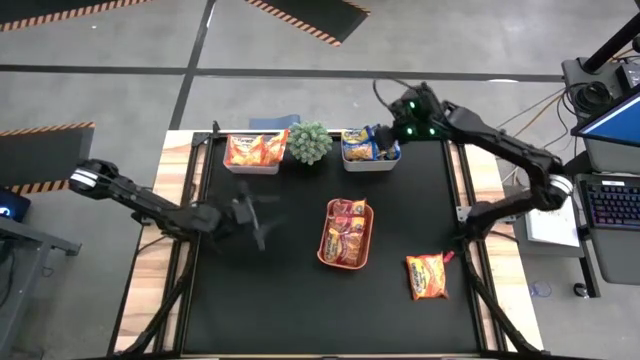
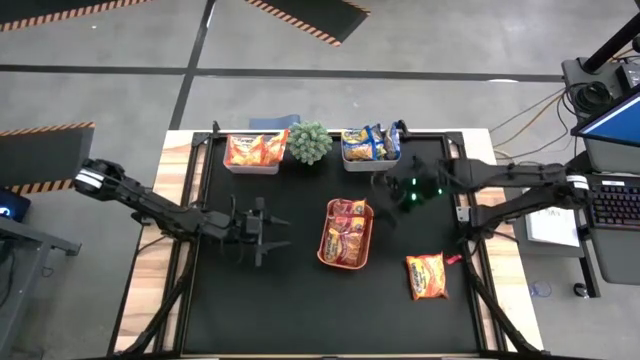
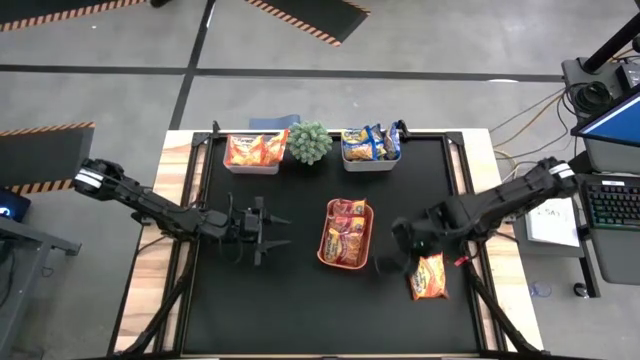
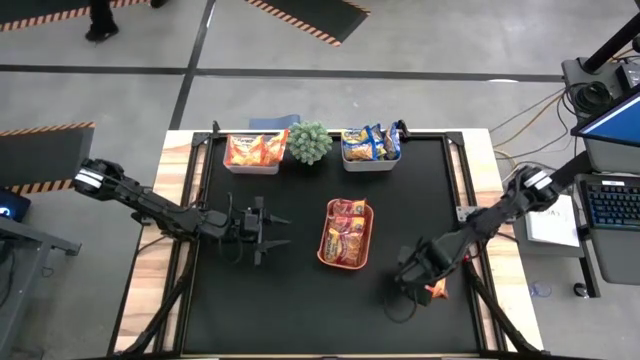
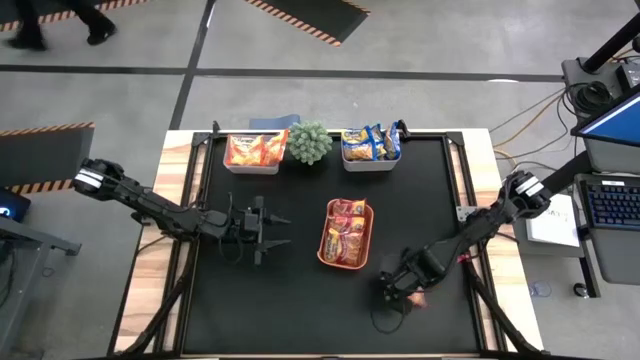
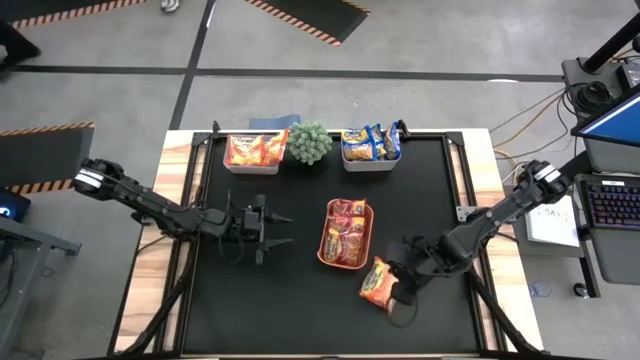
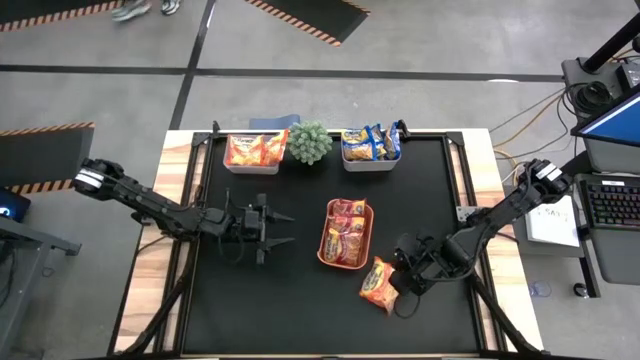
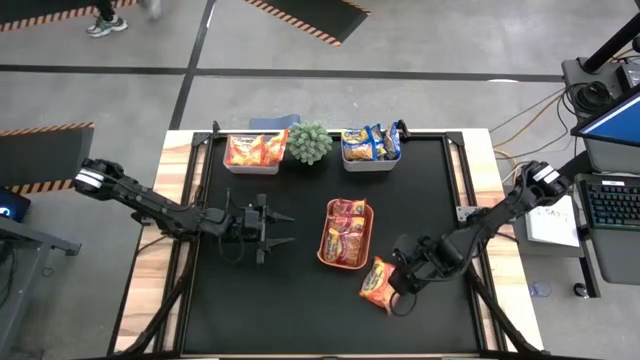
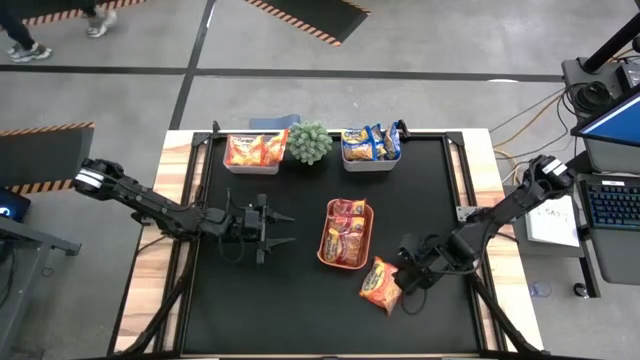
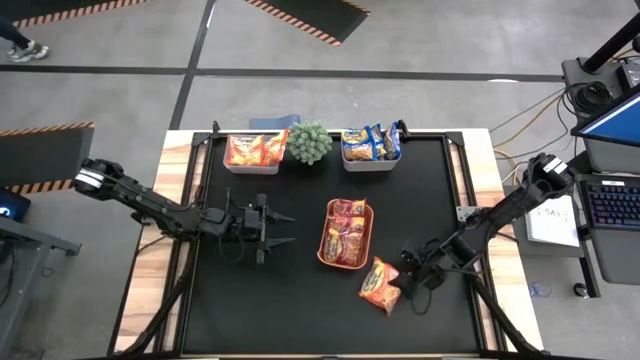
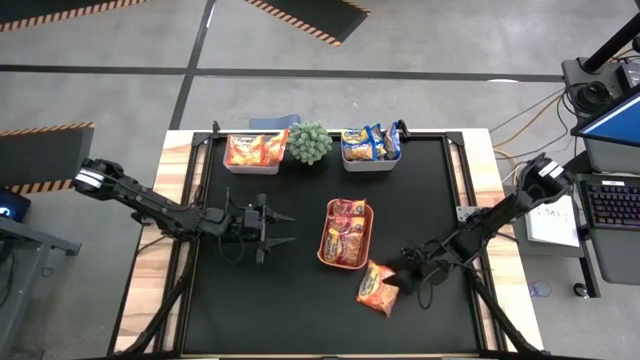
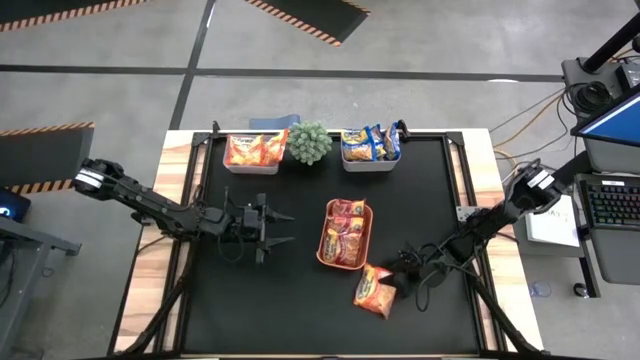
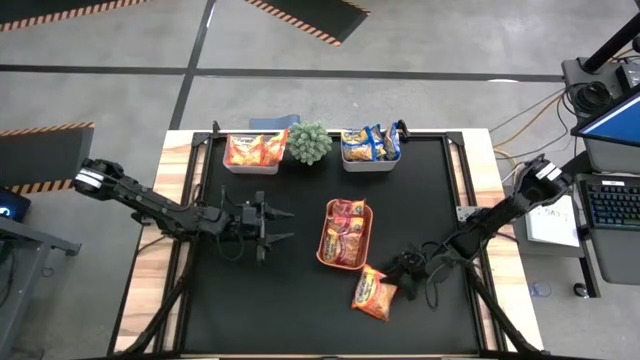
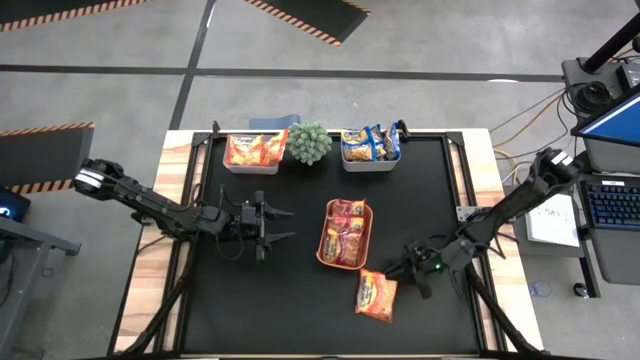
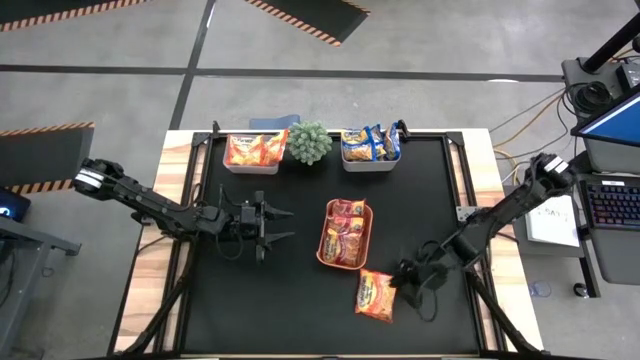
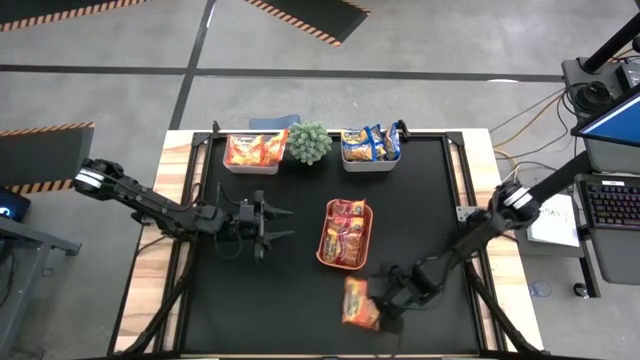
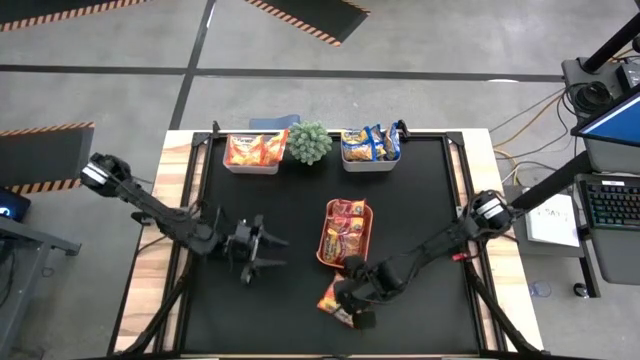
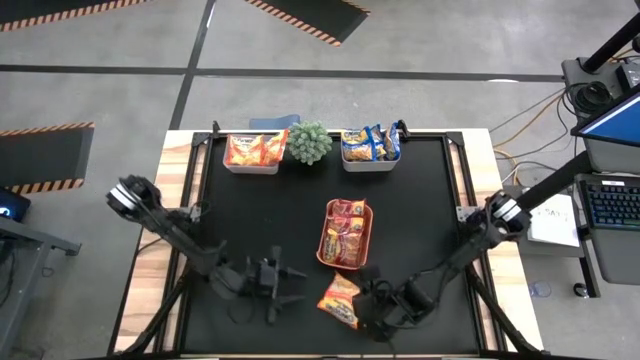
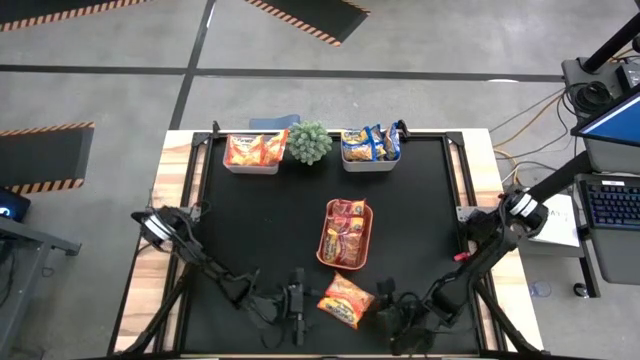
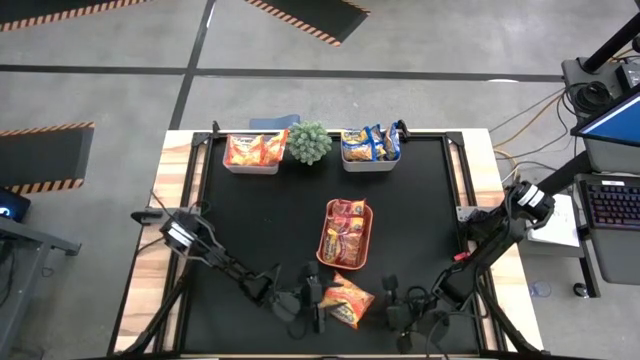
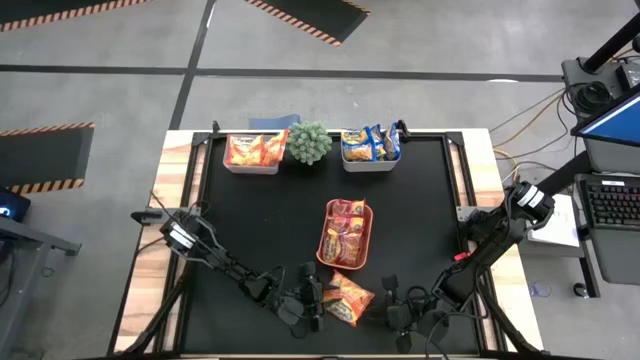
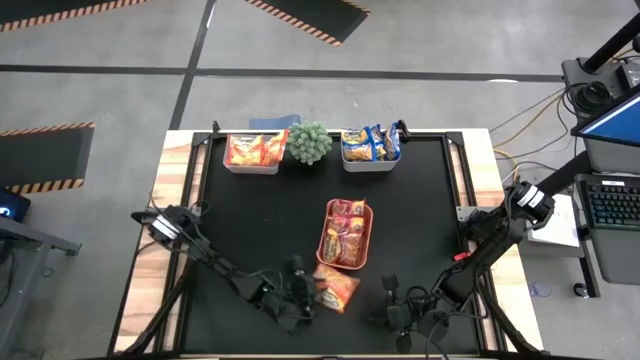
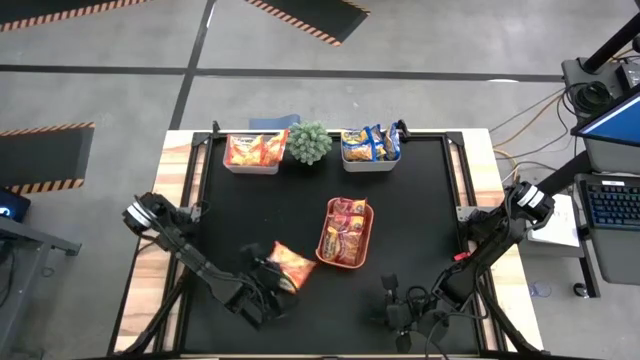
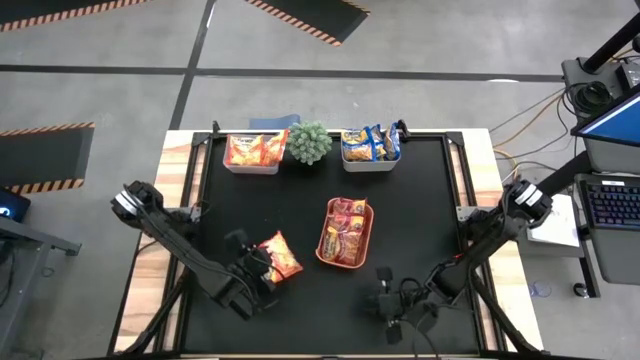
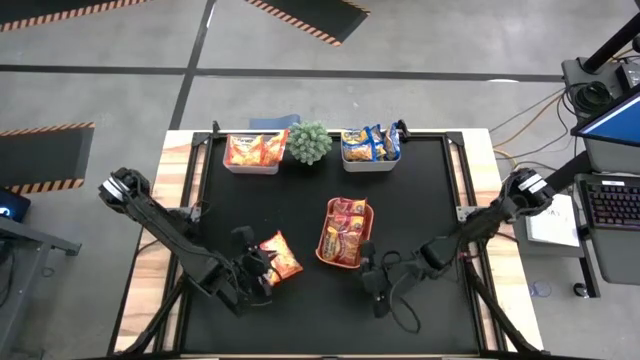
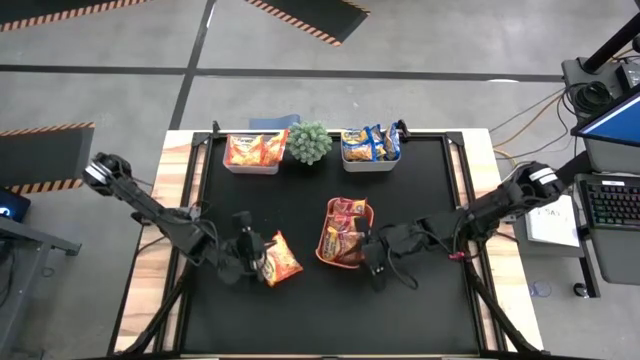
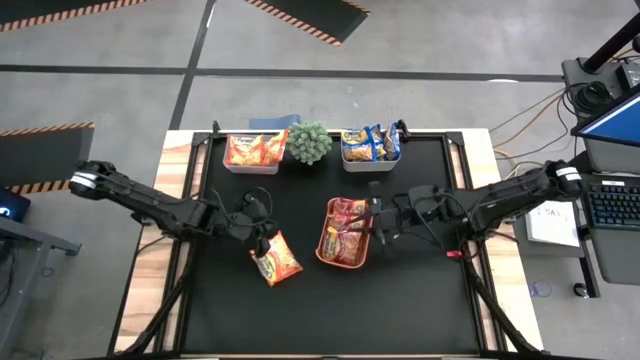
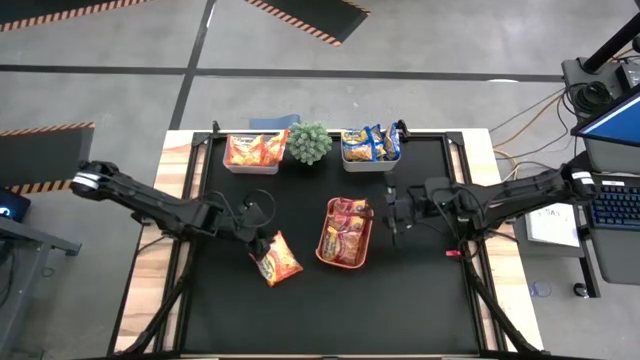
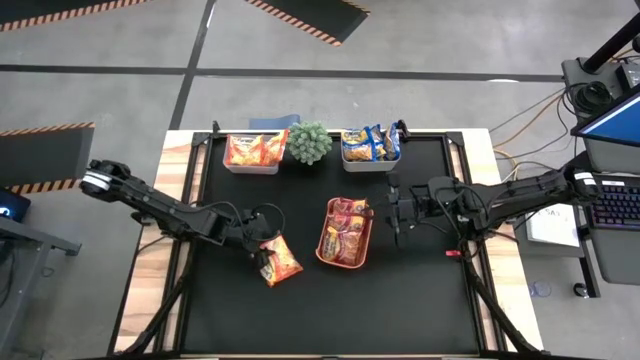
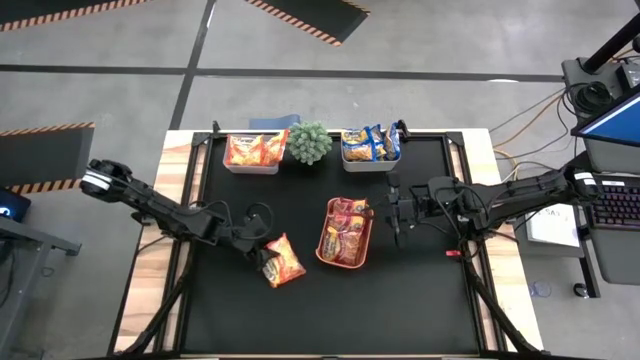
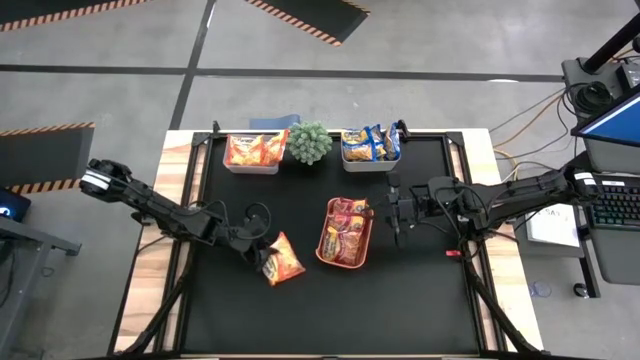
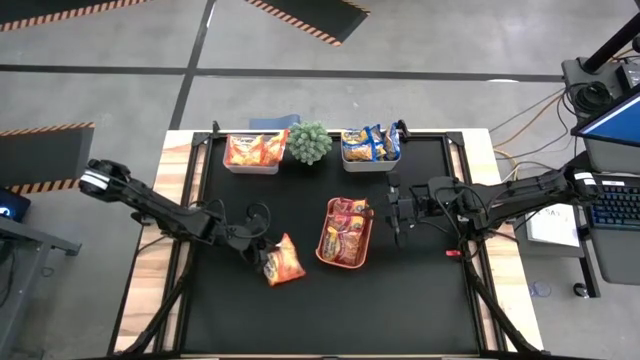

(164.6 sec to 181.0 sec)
Task: Sort Maruchan noodles
Put the orange noodle pack into the transparent bin

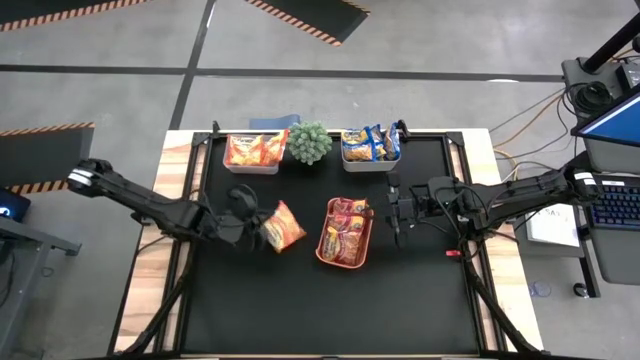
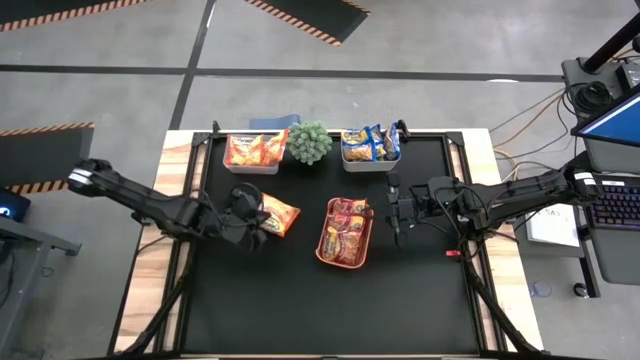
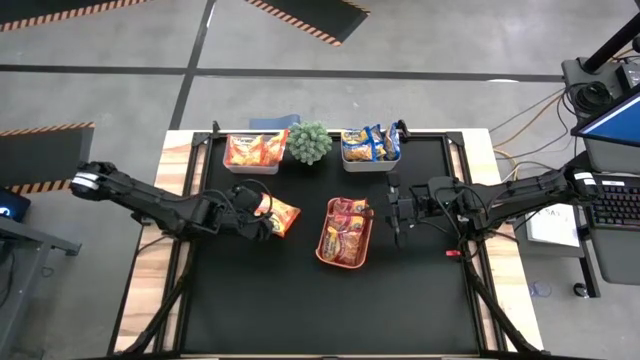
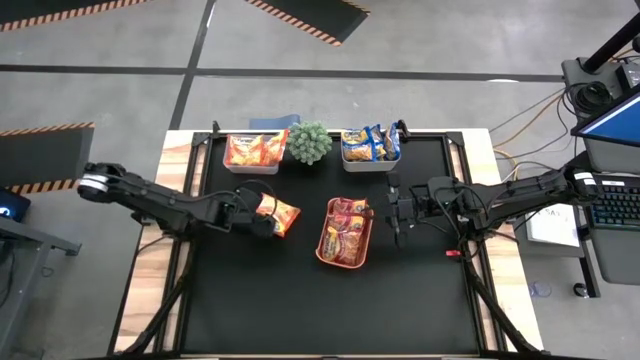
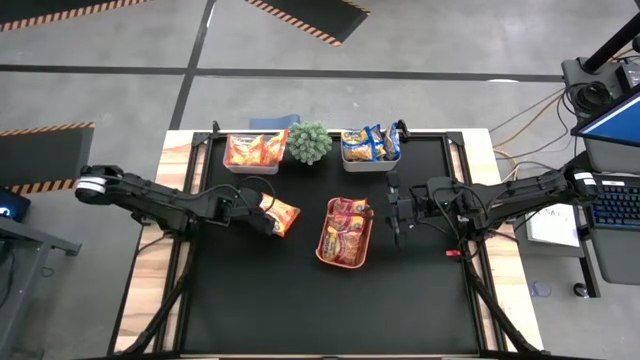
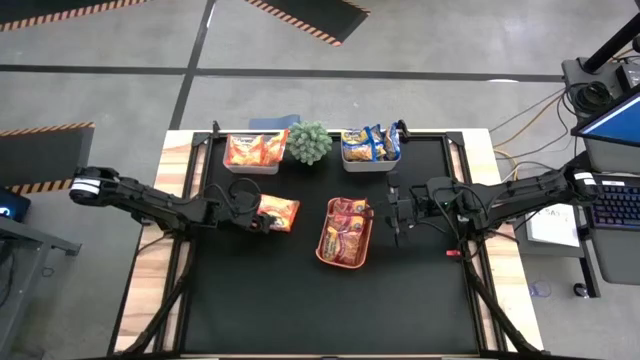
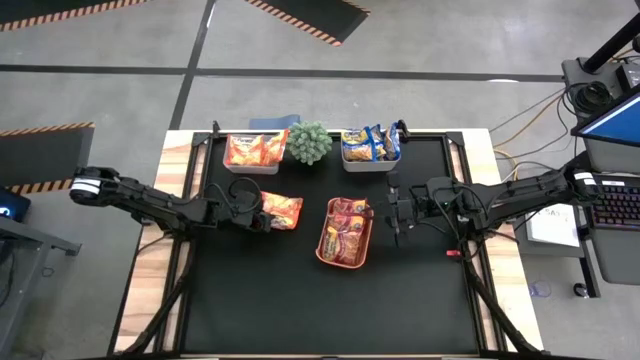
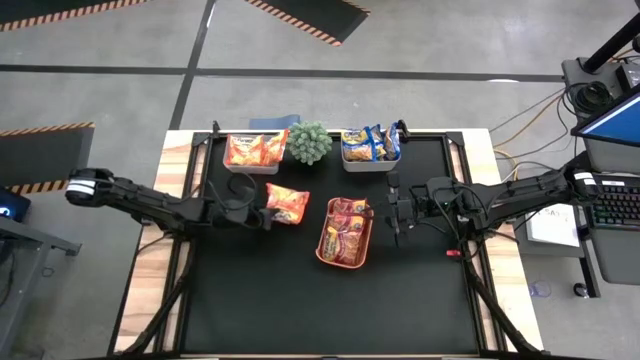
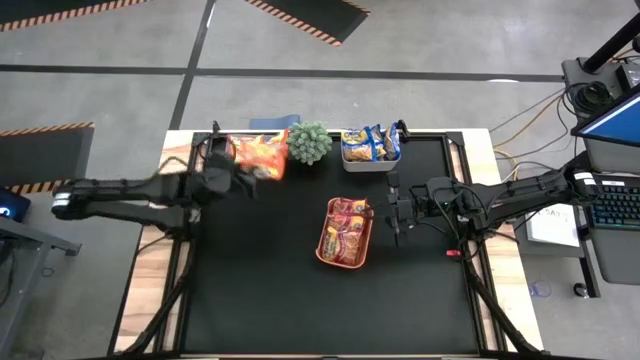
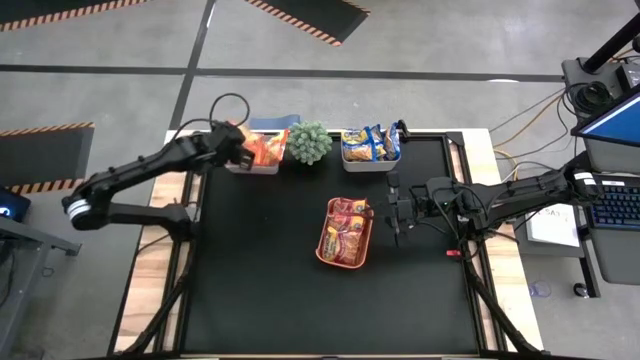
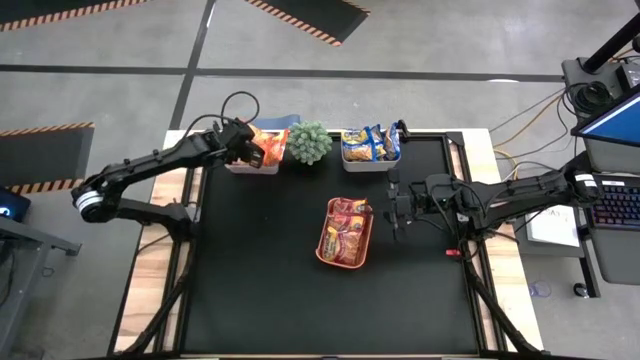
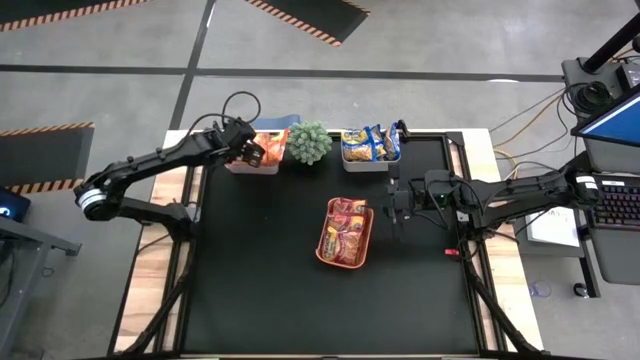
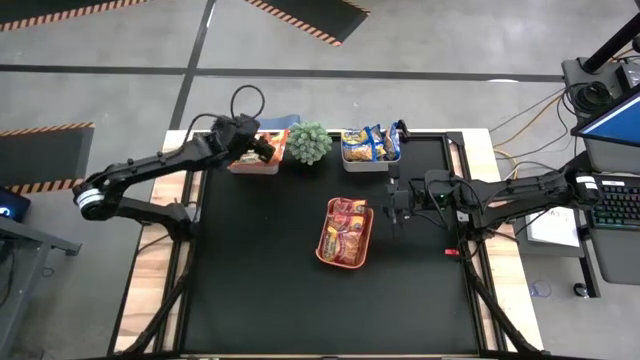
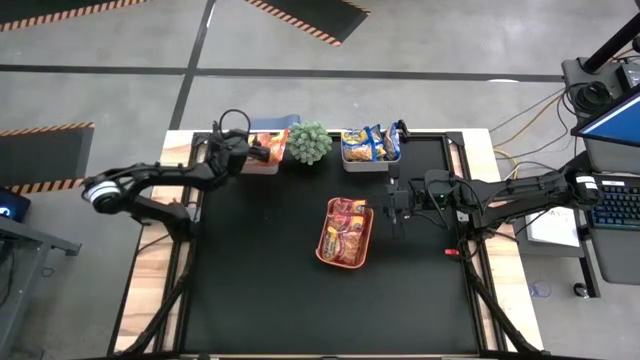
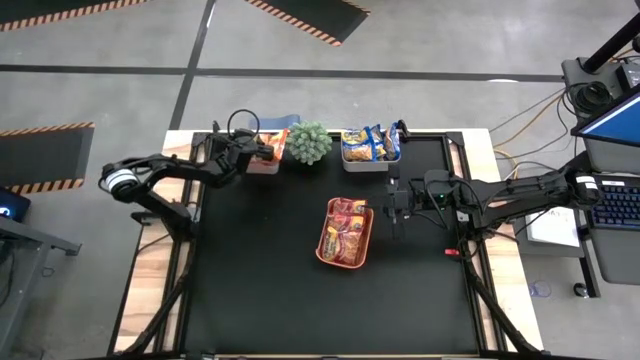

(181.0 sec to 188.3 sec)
Put the orange noodle pack into the transparent bin
